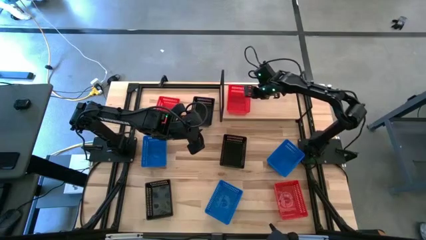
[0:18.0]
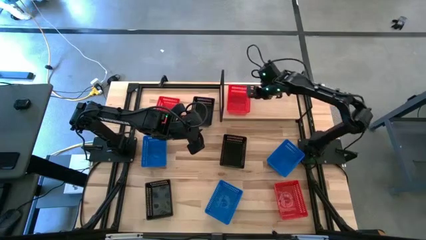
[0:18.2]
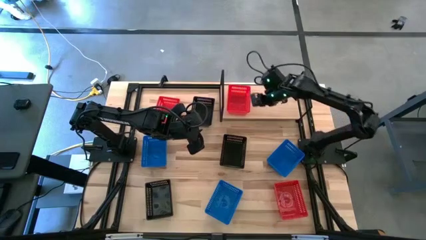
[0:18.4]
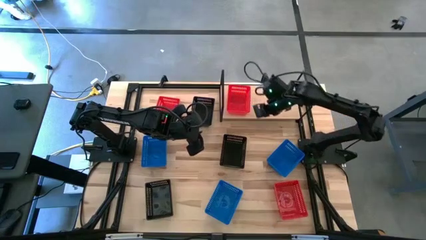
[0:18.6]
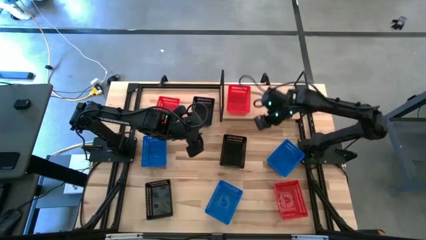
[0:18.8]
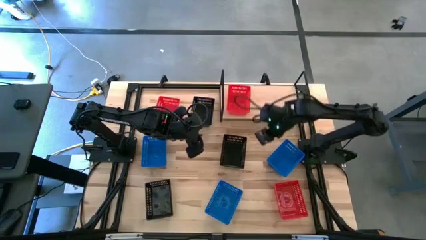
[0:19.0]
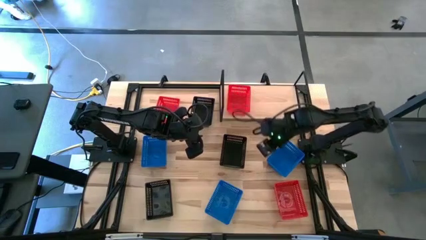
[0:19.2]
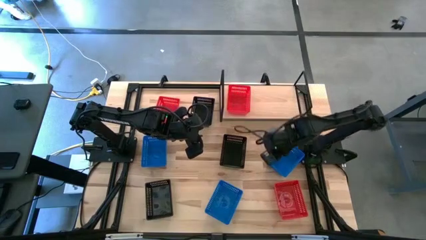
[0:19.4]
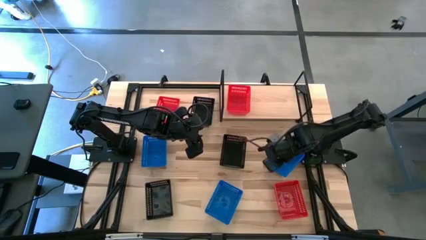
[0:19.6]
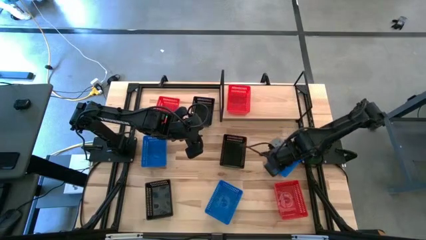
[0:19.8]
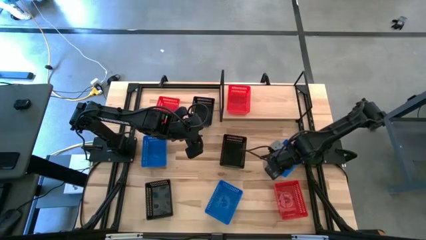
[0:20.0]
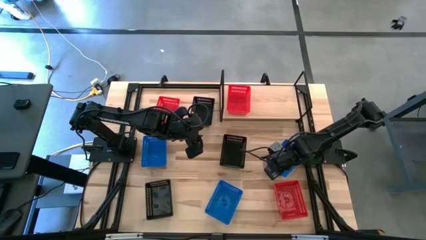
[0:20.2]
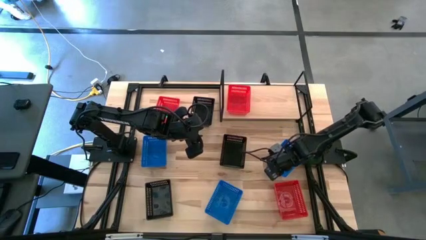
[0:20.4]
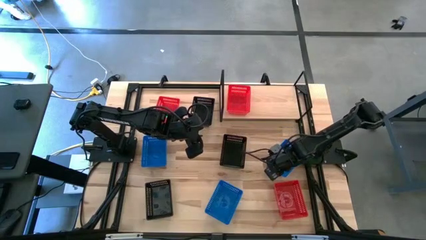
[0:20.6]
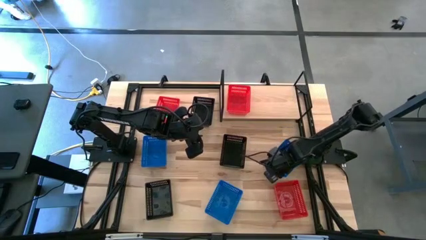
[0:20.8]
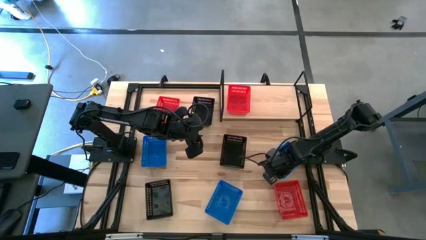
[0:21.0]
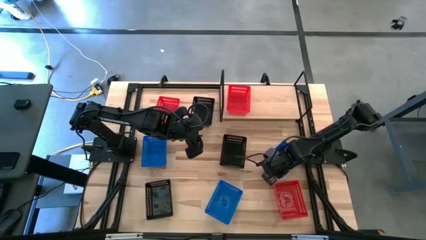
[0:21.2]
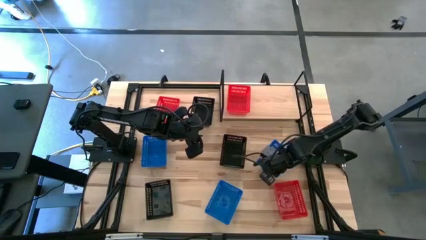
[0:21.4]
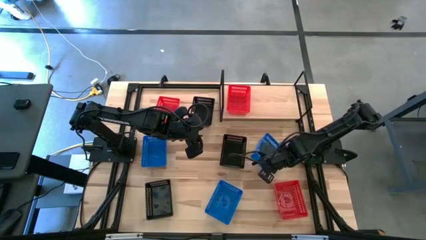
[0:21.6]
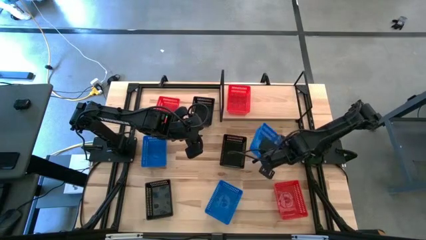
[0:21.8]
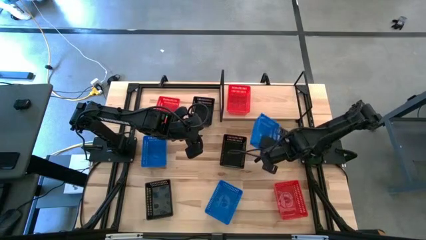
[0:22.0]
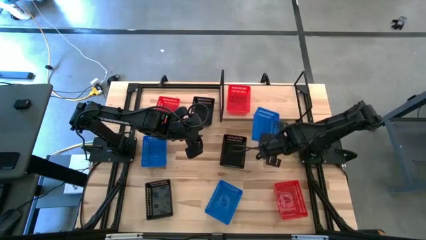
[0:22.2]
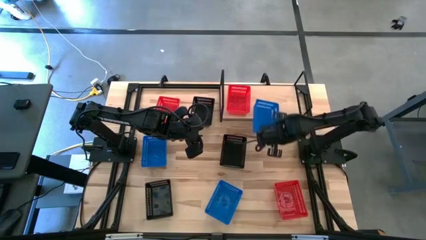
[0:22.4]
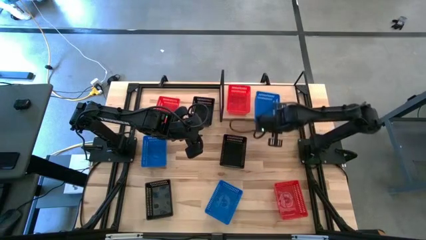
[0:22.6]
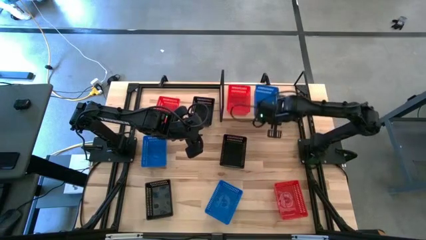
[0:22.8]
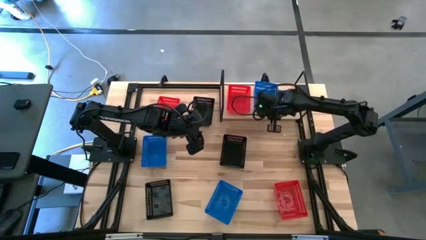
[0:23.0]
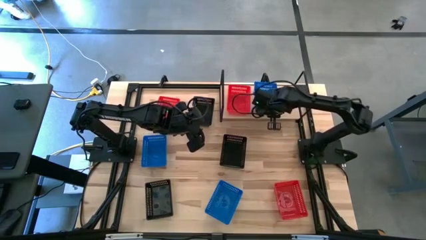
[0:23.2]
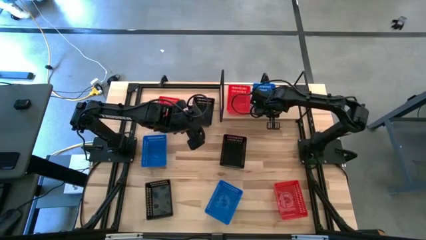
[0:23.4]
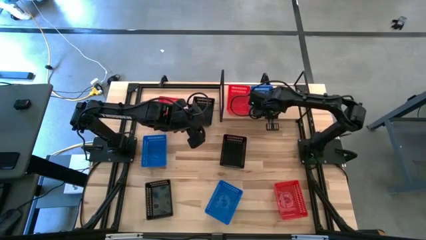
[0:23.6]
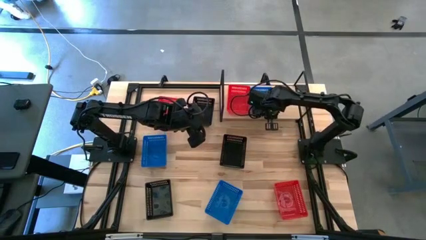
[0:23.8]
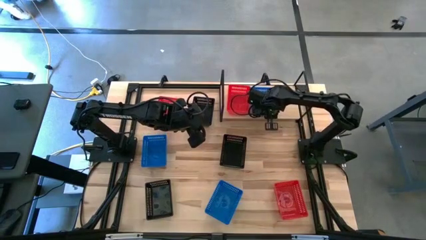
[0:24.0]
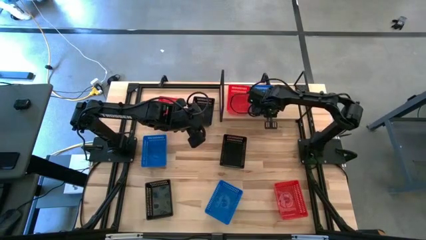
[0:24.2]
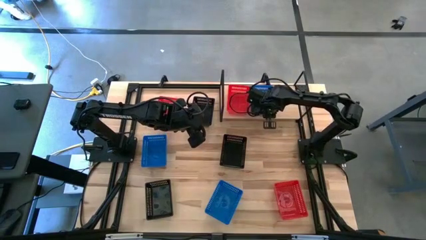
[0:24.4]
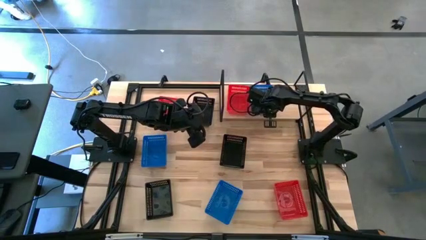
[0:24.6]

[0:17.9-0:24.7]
Task: Stack baskets on shelf by color
Put the top right blue bin on the shelf

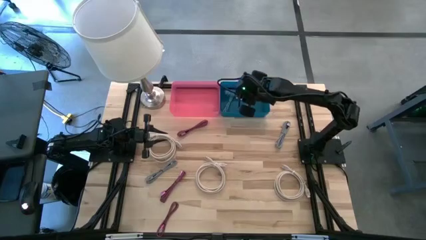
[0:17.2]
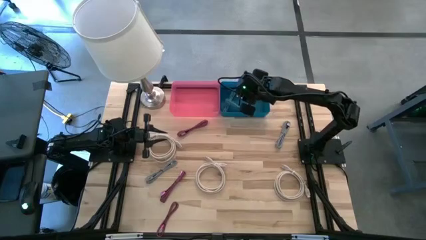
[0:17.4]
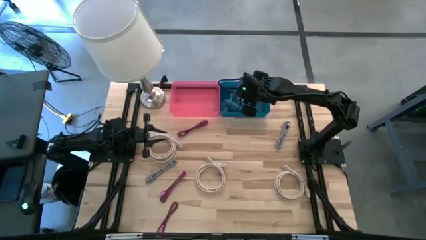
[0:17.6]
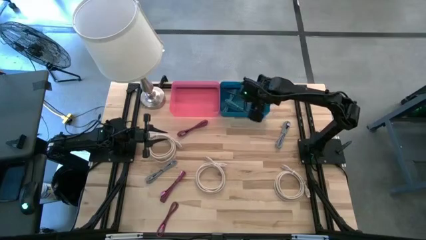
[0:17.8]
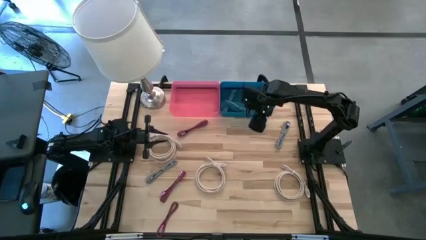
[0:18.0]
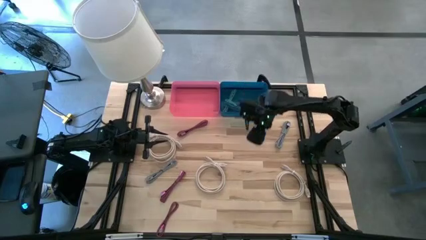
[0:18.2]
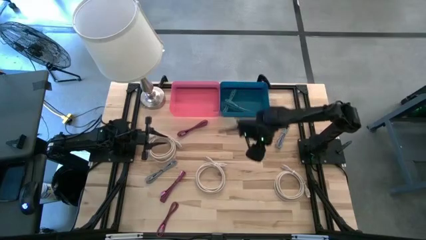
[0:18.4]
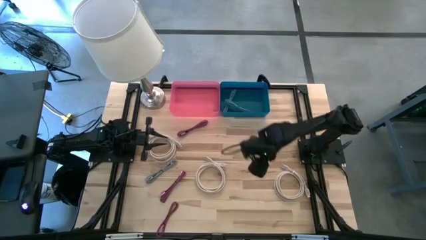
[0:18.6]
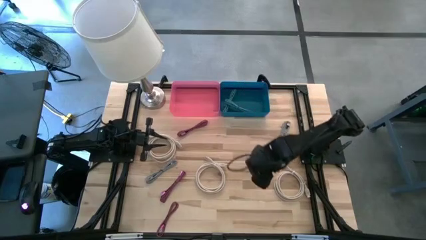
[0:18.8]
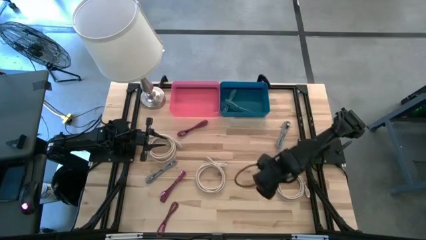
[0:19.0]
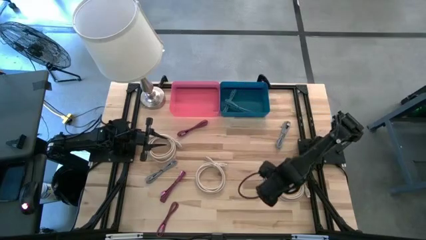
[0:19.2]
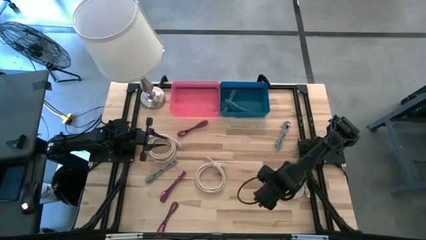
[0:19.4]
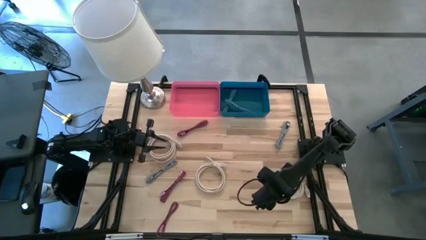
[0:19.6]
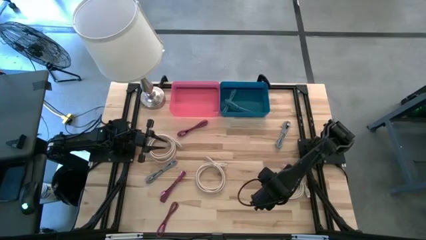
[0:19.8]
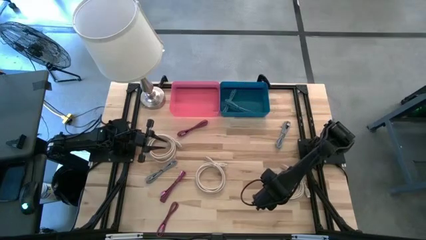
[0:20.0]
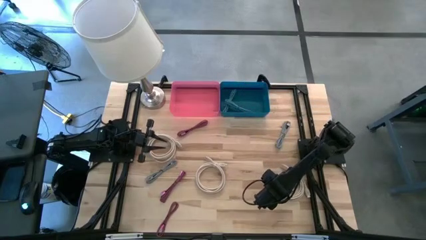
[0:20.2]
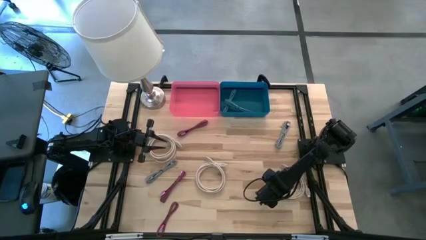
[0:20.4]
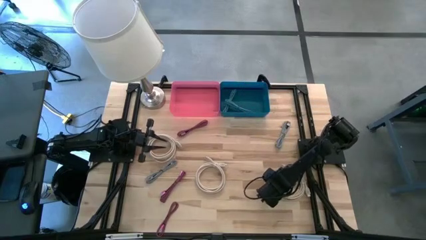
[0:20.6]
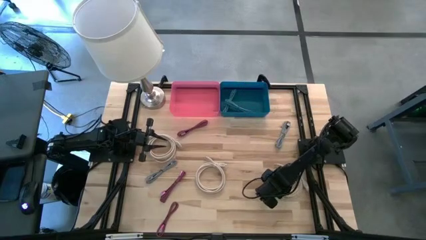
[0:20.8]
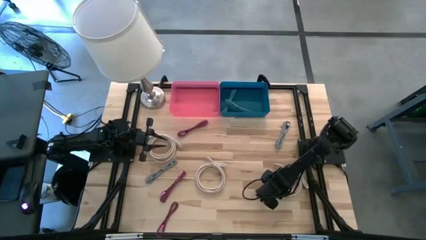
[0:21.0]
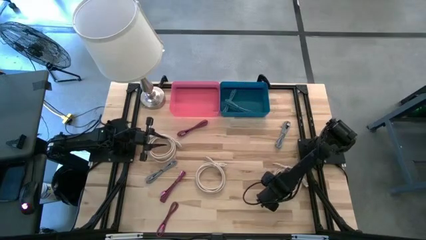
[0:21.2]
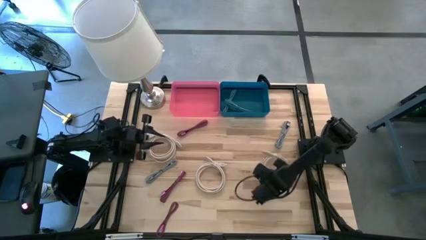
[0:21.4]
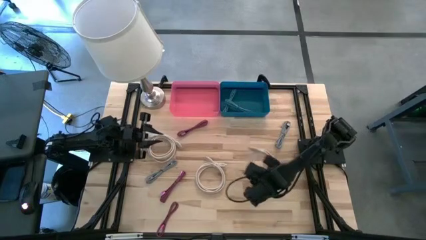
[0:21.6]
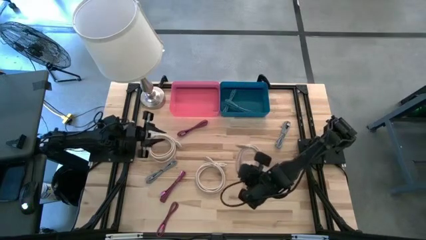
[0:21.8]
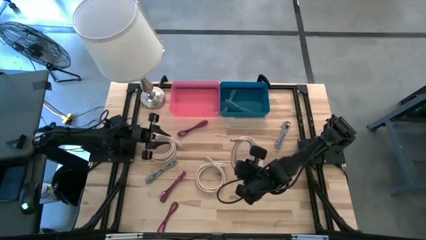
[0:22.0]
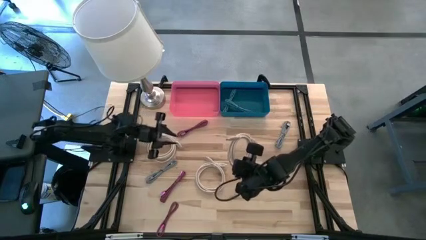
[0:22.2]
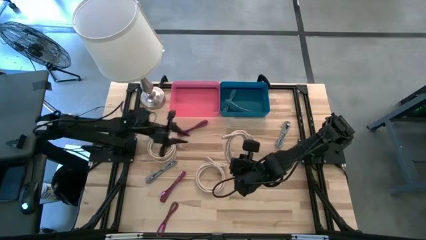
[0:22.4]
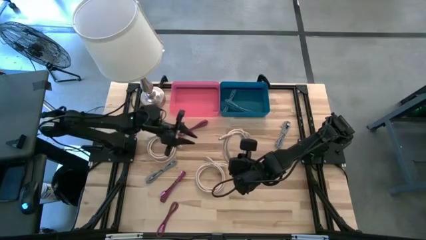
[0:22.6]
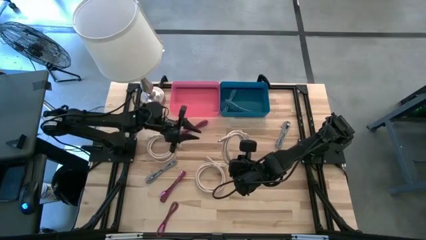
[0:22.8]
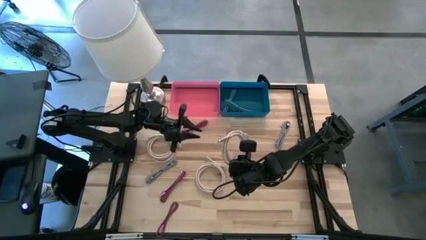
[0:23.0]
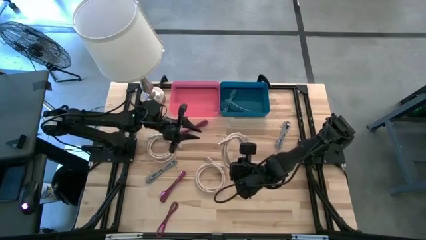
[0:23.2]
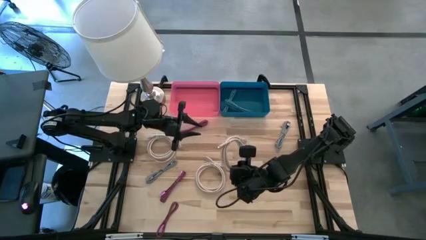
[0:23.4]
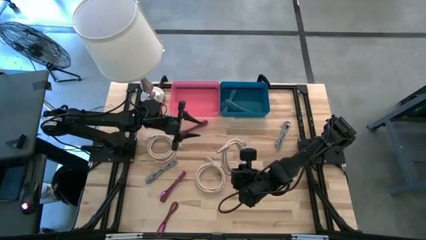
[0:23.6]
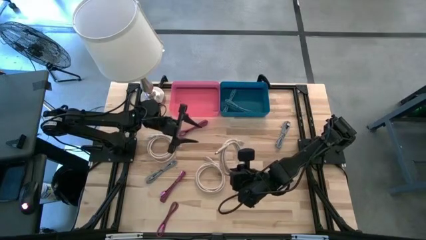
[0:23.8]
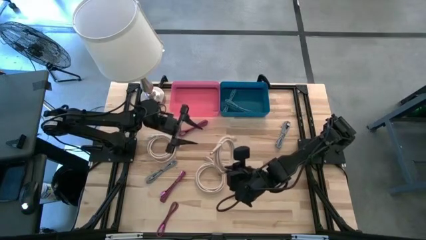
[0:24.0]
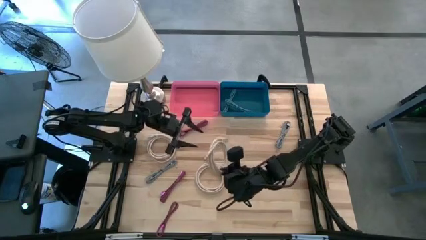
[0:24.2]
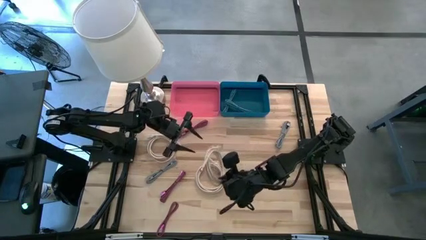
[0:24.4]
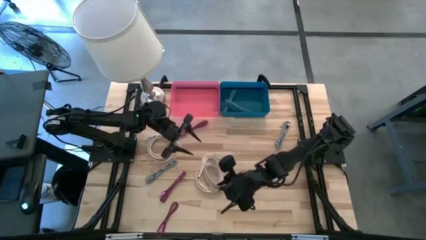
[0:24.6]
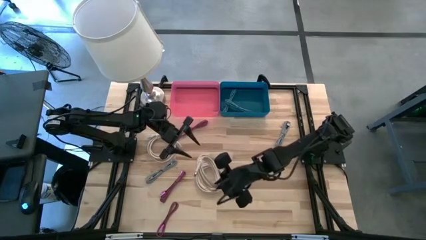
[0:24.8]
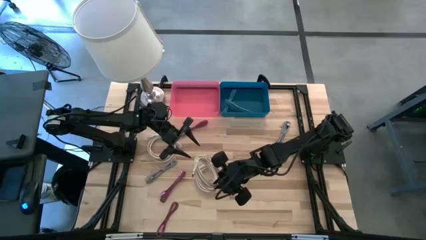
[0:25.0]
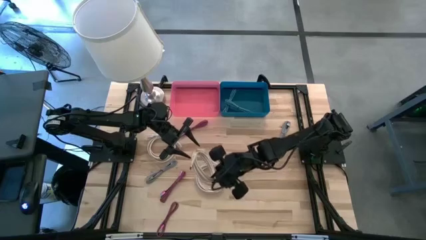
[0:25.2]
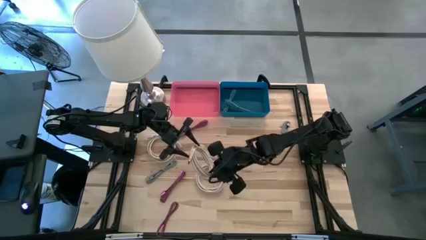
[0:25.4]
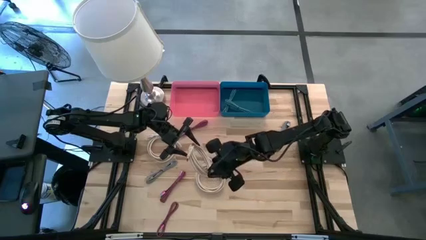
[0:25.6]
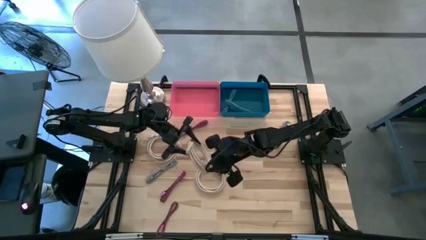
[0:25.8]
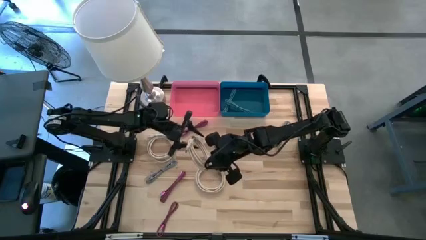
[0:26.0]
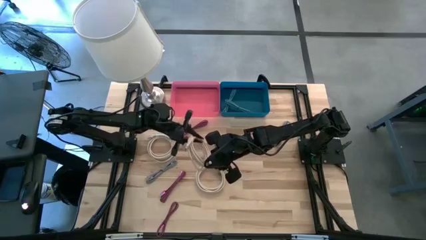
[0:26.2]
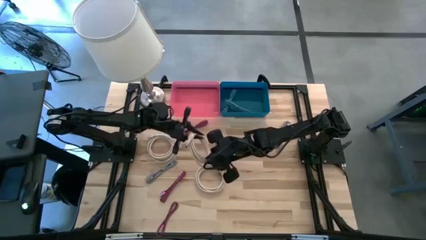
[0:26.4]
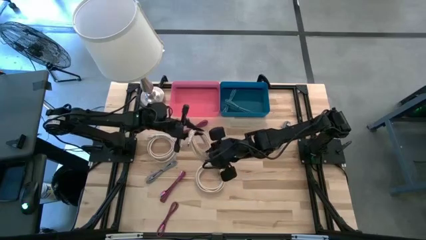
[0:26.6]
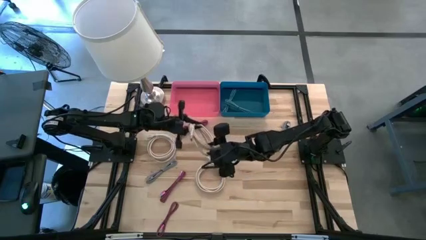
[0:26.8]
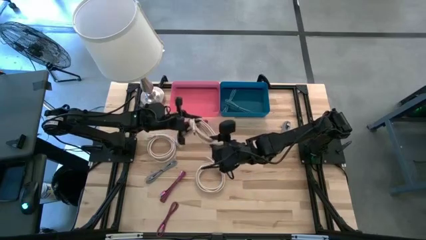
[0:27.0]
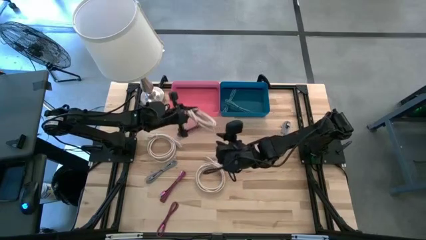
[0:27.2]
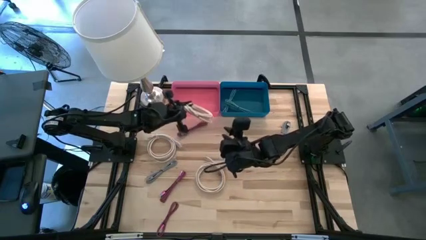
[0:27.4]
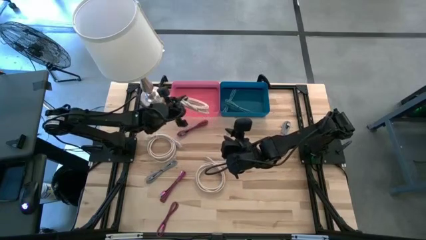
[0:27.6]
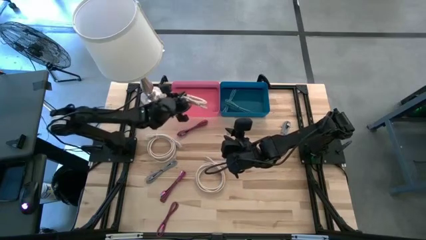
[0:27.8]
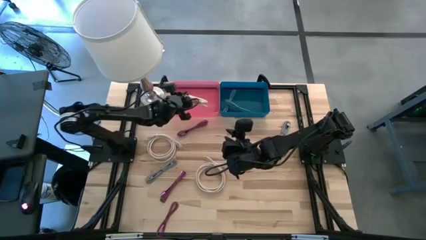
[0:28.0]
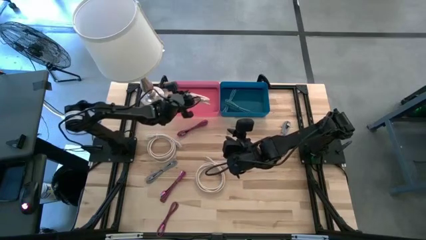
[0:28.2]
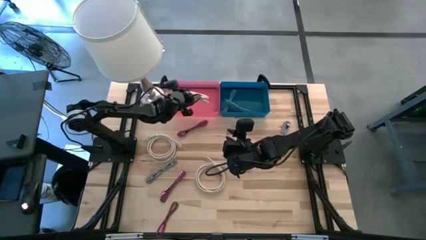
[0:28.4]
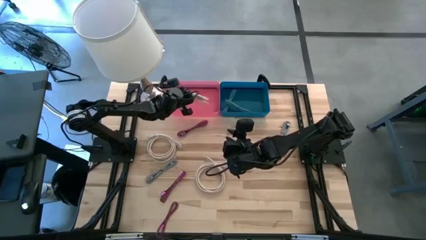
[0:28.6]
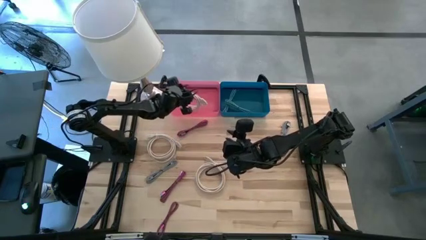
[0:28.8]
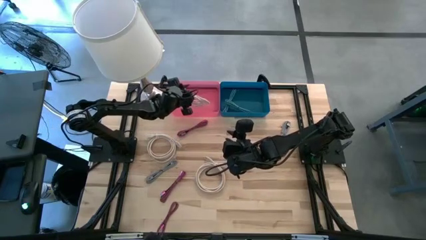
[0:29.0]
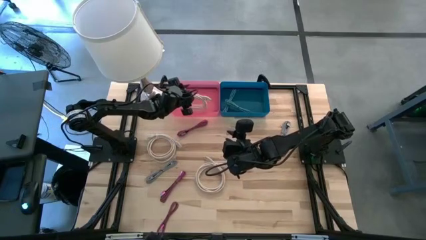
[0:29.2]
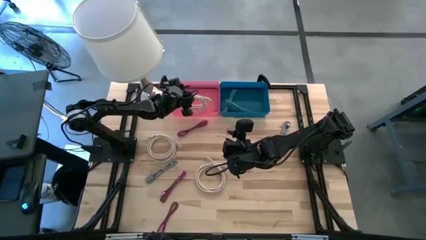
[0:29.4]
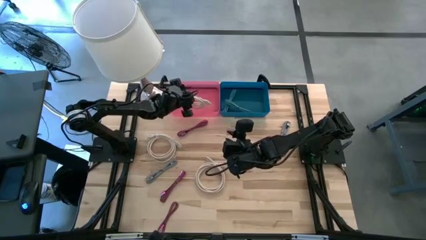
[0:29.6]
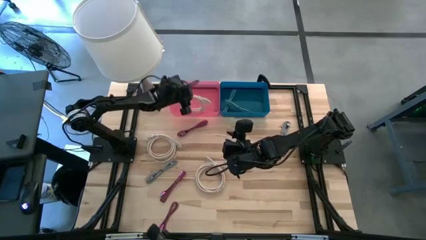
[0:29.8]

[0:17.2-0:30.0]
Task: Pick & Place USB Port
Put the bottom right large white charger cable into the red bin
